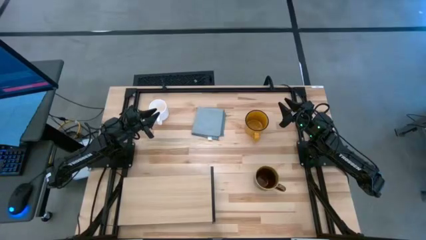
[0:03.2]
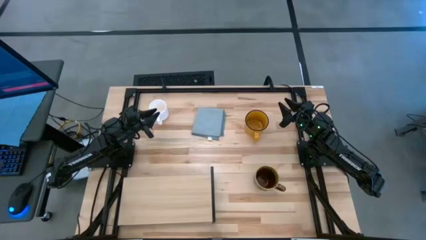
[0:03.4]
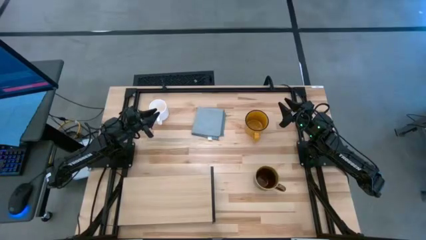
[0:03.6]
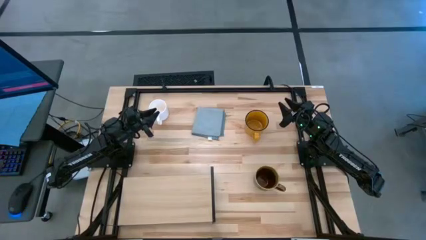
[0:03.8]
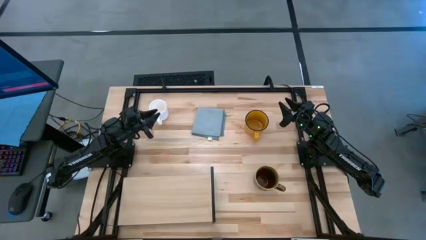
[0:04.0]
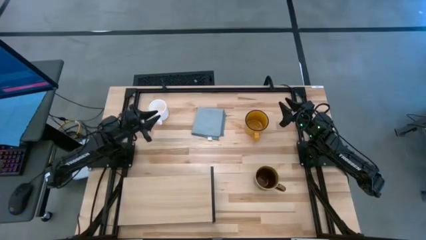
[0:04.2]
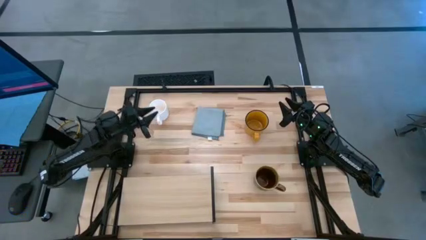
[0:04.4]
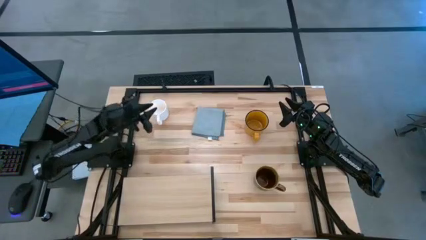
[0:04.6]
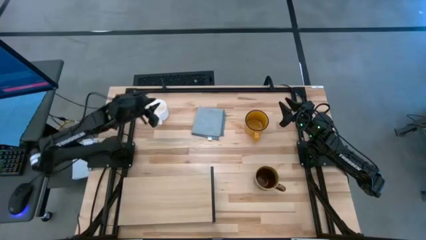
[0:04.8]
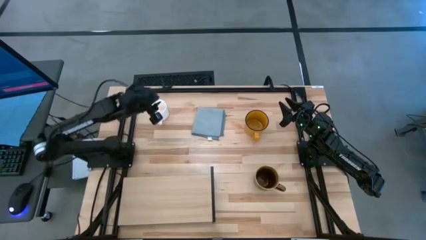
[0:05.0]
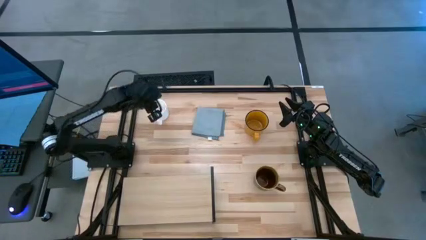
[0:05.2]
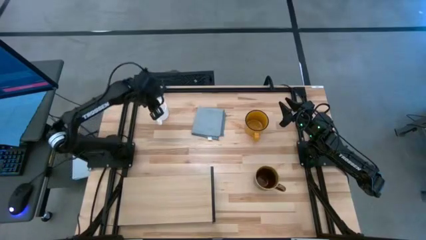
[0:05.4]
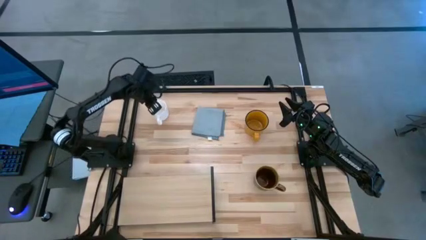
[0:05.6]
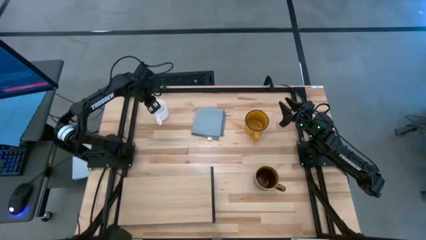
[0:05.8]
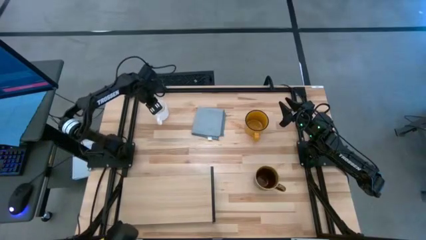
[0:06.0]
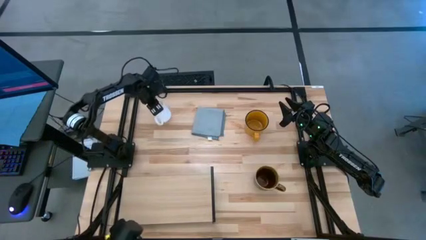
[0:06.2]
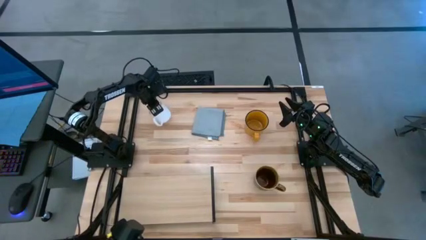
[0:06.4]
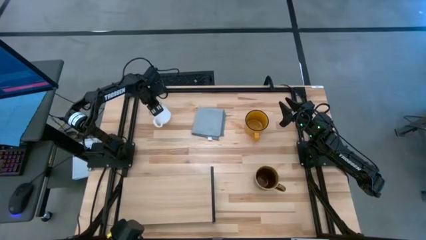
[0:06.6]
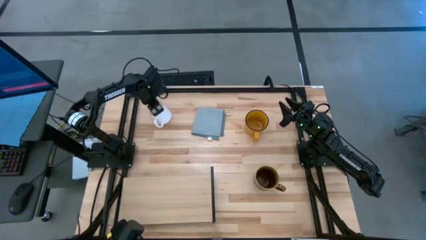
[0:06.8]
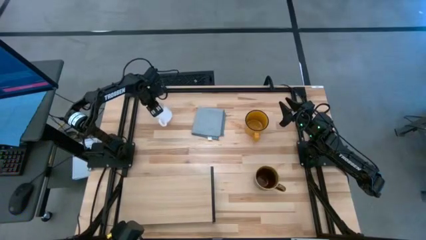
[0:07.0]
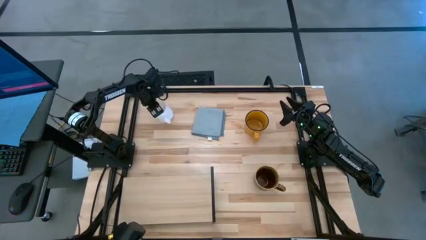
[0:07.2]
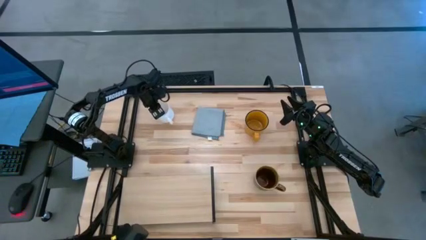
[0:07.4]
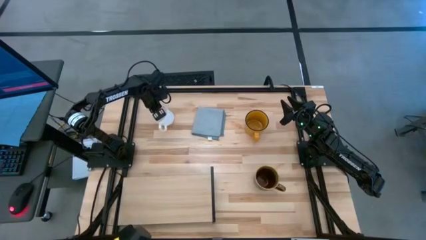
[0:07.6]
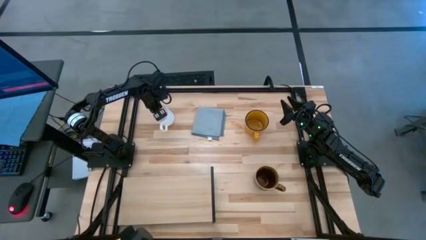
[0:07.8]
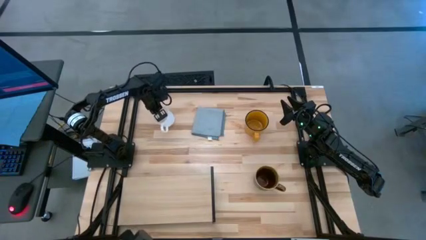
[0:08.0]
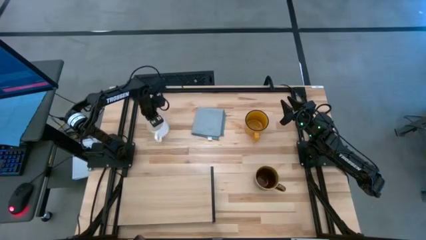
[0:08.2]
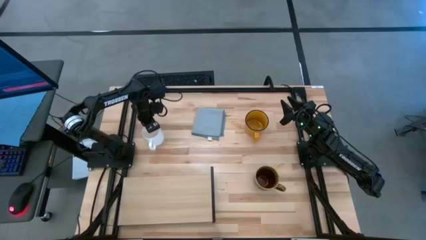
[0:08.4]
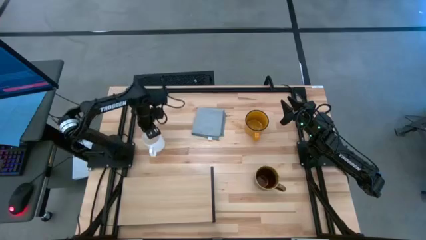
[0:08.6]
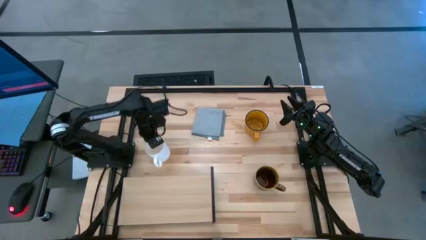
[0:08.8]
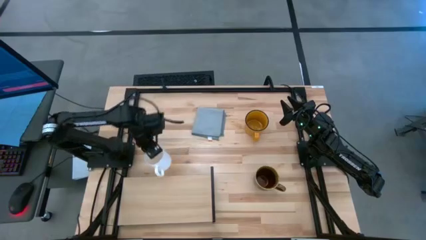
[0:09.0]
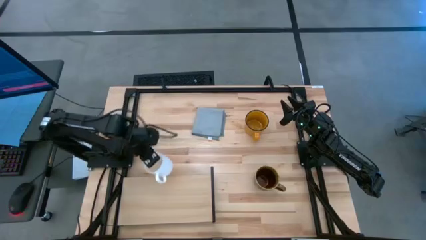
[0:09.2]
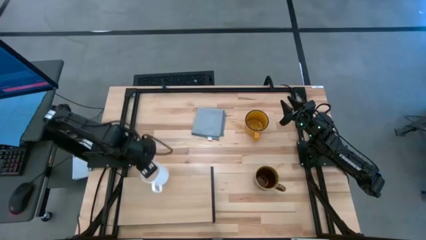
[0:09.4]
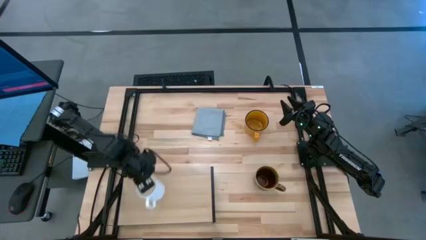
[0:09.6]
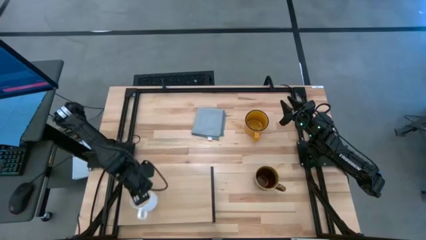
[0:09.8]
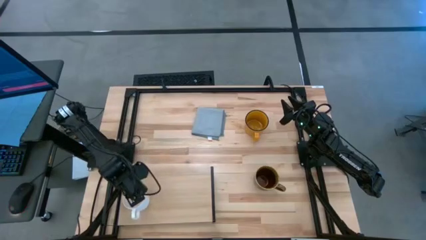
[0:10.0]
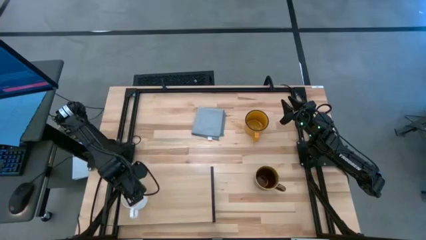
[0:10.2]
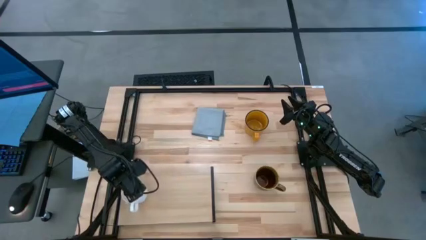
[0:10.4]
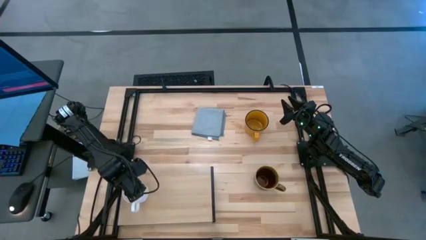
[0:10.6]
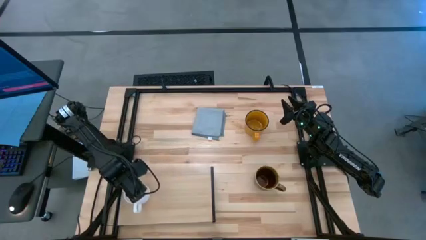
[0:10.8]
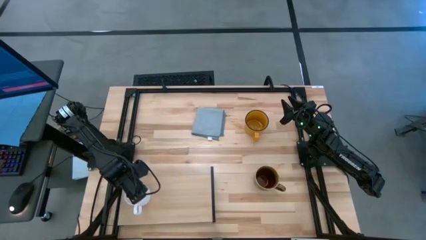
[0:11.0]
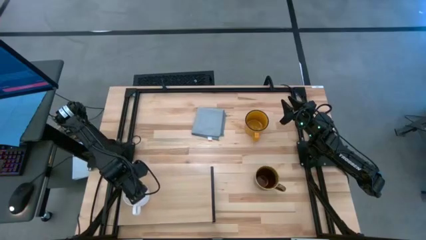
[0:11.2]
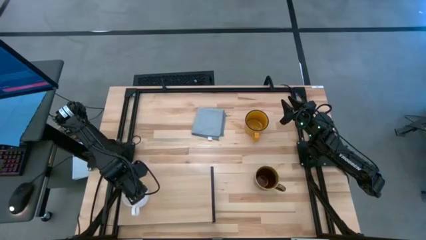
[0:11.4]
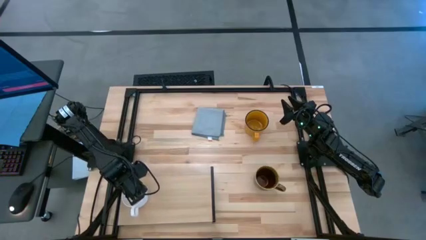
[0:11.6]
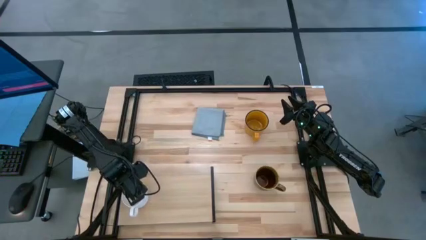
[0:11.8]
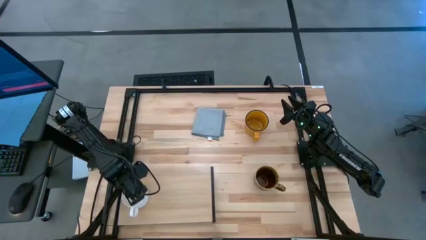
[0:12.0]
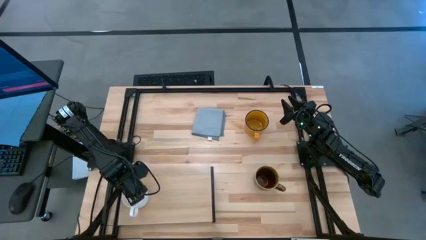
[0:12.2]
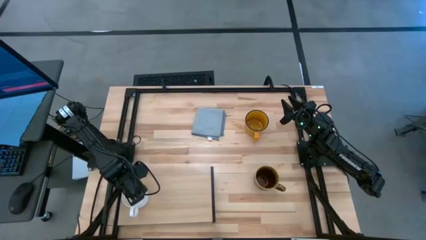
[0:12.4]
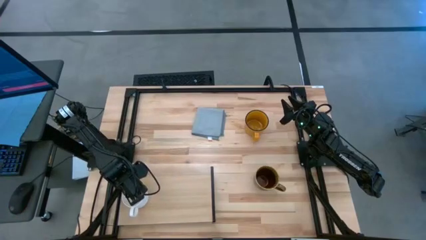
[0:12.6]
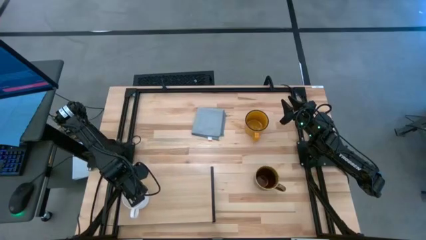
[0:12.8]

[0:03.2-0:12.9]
Task: Stack small to large cups/mugs on shelf
Put the white mug onto the shelf

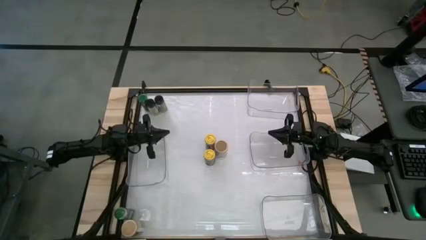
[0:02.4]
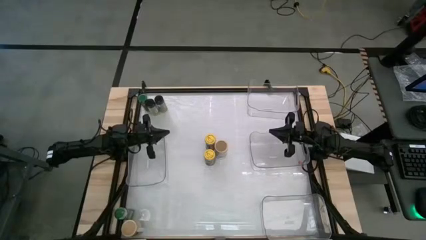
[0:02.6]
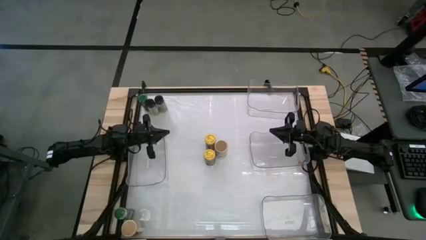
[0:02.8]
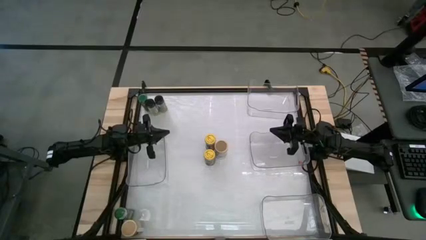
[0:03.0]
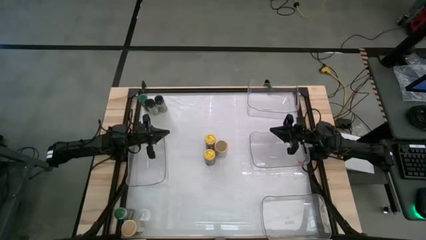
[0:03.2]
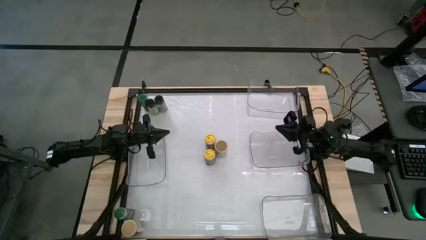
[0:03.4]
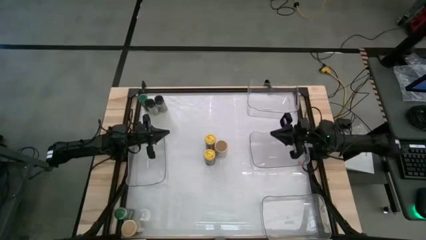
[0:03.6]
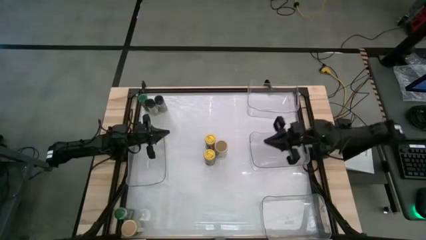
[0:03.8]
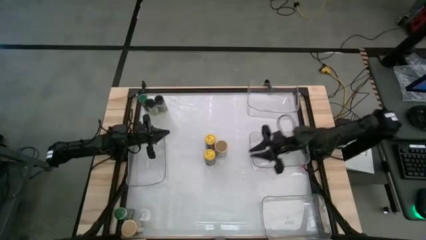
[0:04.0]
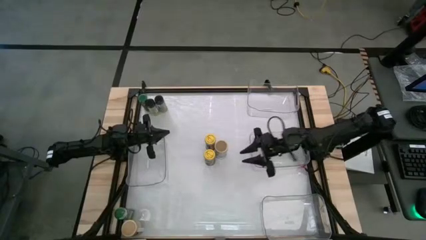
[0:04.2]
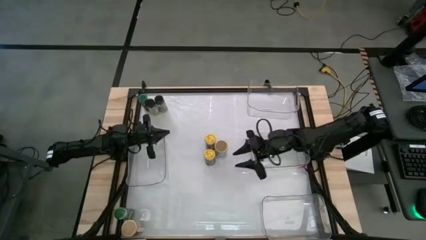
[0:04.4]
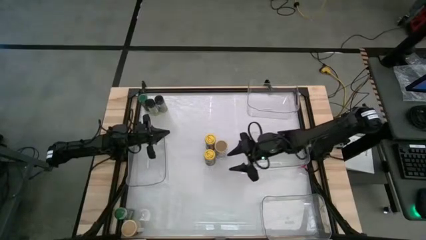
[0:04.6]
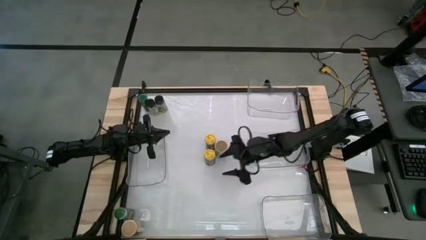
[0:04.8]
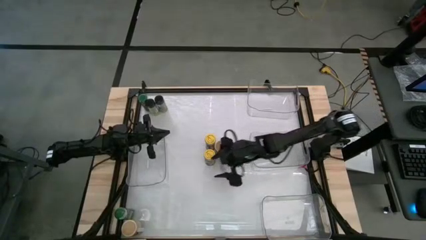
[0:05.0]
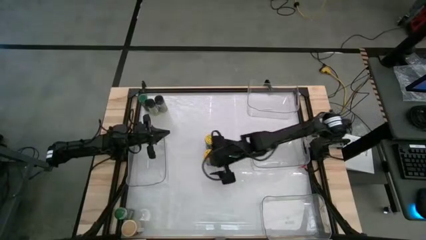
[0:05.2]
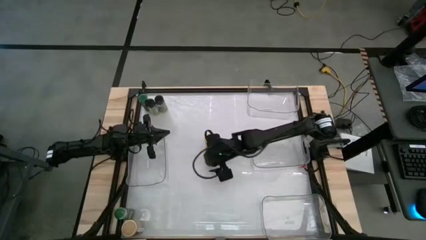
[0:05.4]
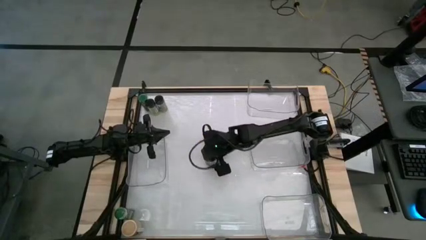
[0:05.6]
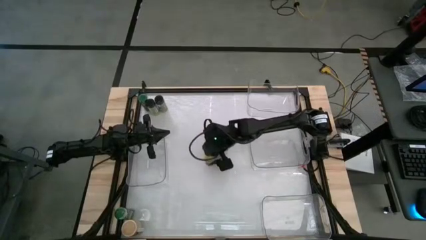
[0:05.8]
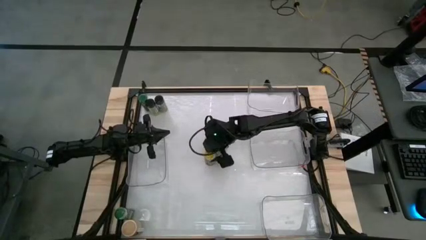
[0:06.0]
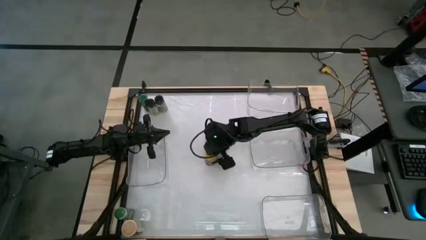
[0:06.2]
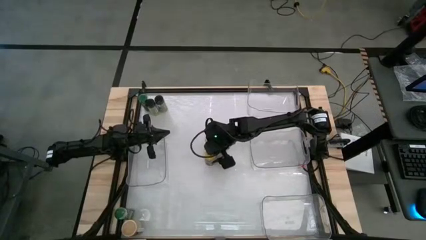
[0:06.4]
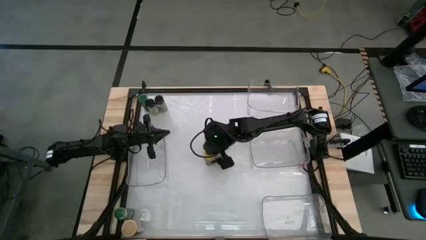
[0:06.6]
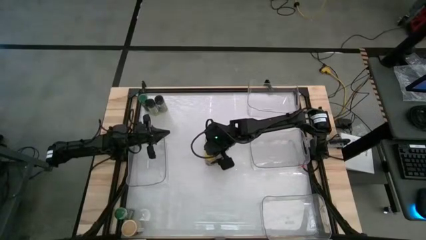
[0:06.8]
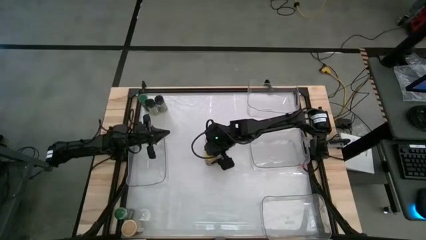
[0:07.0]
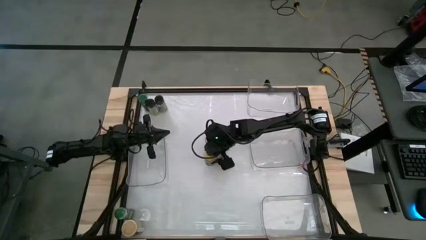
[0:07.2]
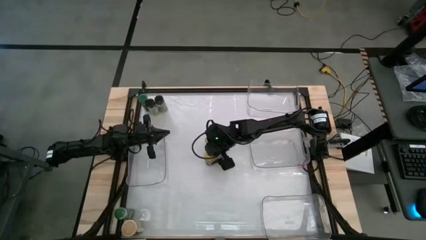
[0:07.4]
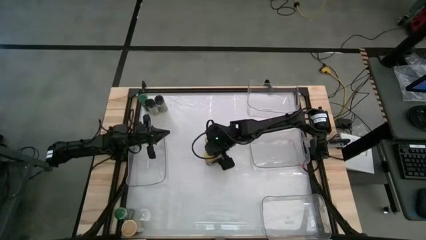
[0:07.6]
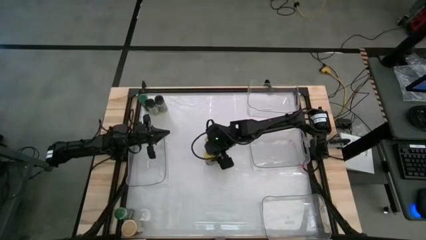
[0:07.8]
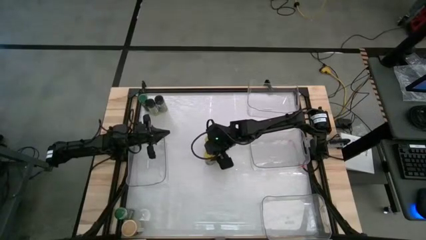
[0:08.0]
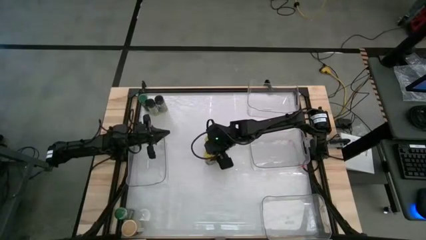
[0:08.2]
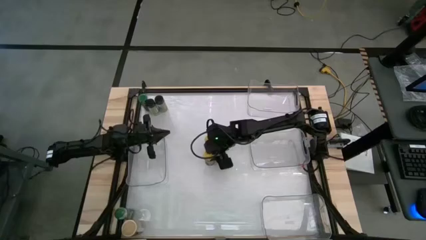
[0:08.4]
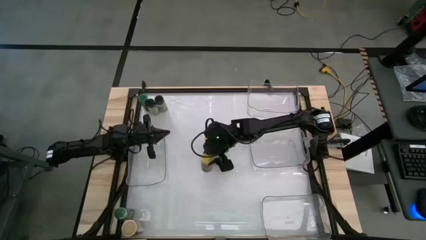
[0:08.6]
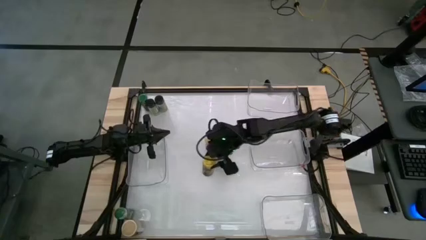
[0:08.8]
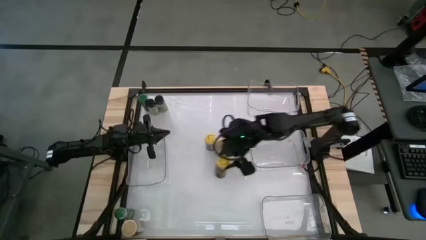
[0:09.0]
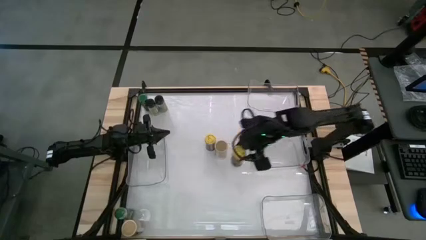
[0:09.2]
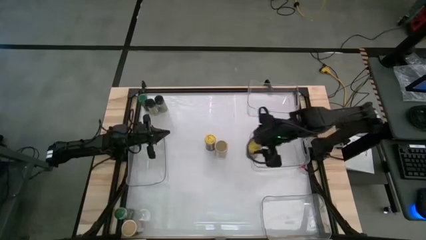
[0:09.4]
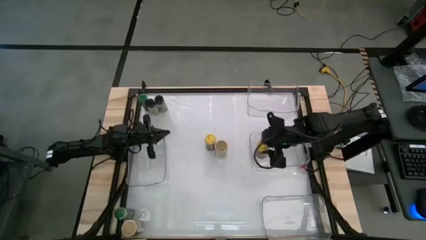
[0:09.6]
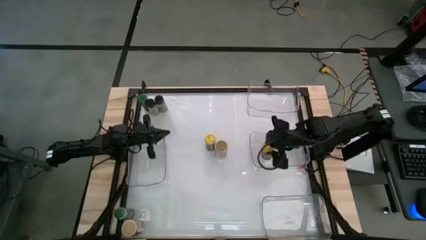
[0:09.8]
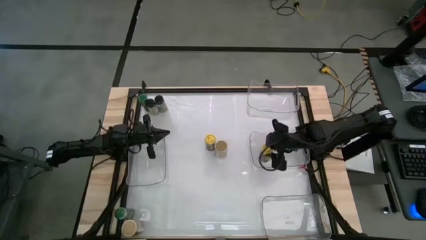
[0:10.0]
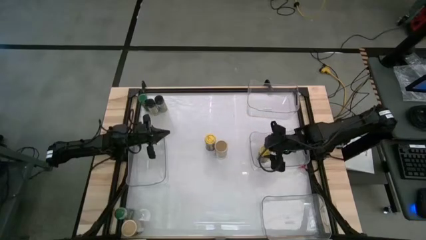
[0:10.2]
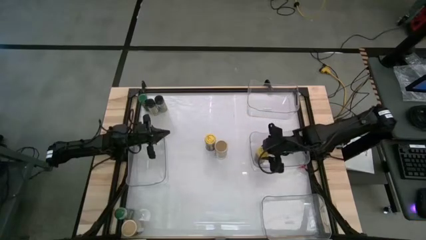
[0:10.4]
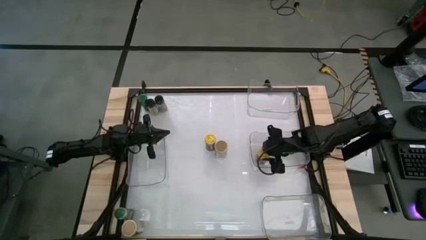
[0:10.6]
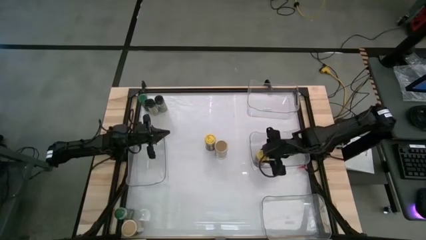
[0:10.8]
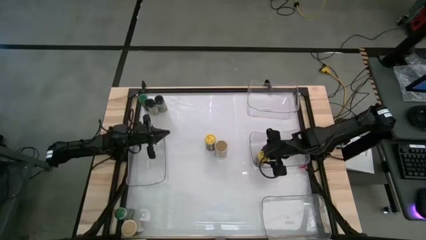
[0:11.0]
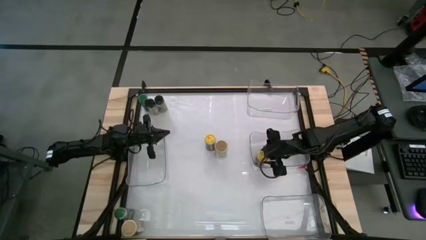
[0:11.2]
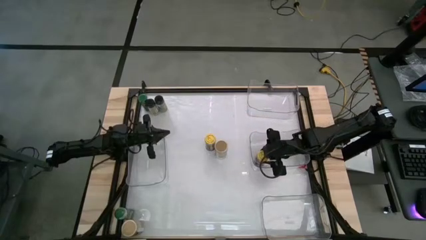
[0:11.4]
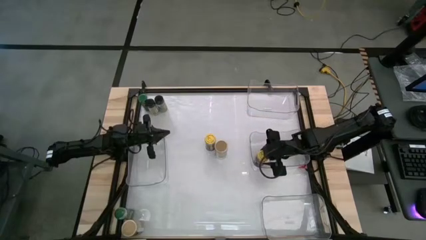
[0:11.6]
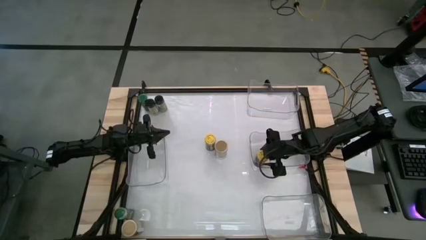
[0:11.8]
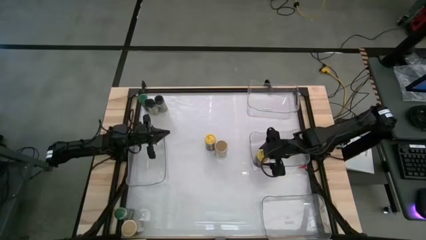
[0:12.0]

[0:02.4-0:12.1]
Task: Sort spices by type
Put the bottom yellow seasoning bottle into the middle right transparent bin
